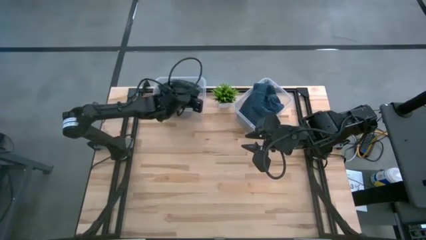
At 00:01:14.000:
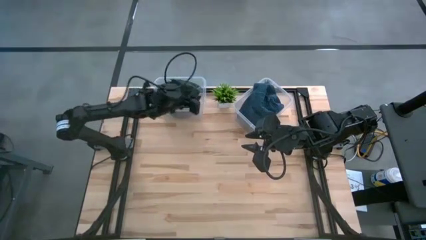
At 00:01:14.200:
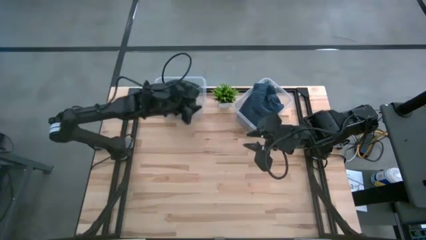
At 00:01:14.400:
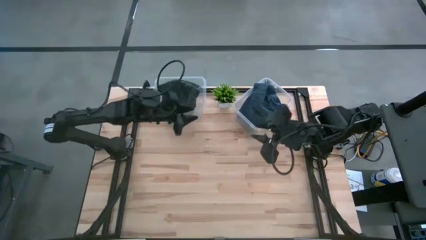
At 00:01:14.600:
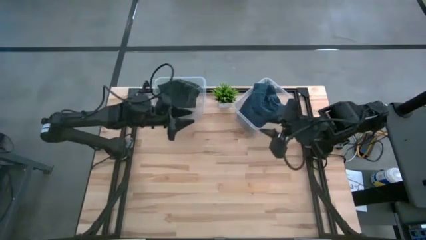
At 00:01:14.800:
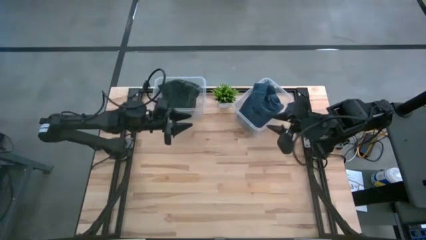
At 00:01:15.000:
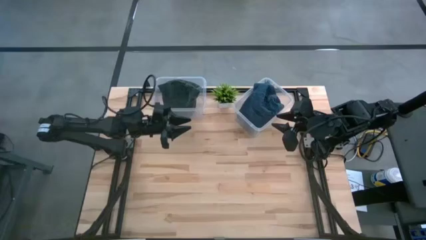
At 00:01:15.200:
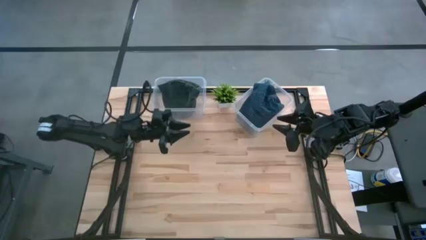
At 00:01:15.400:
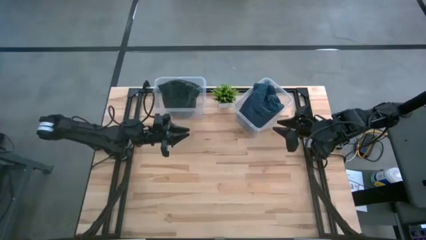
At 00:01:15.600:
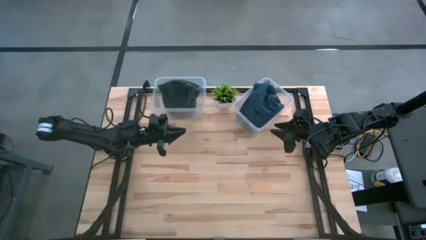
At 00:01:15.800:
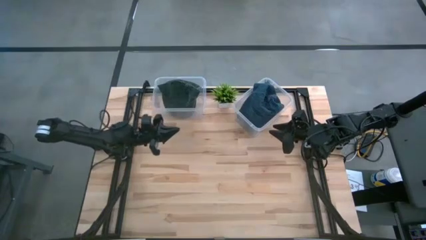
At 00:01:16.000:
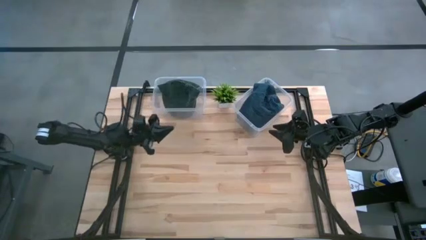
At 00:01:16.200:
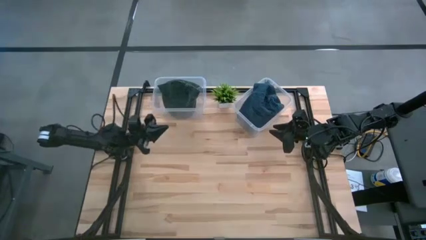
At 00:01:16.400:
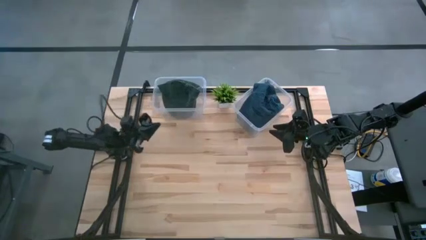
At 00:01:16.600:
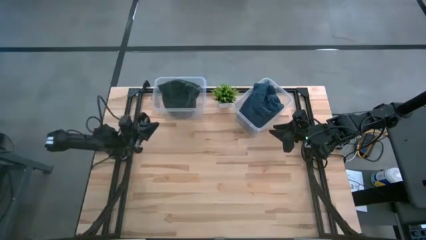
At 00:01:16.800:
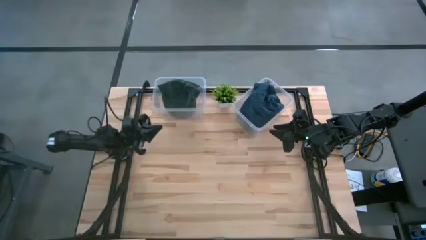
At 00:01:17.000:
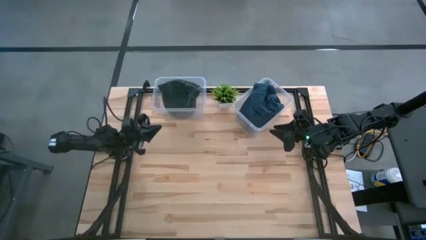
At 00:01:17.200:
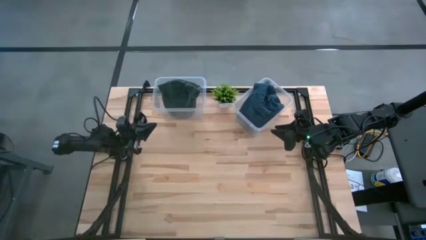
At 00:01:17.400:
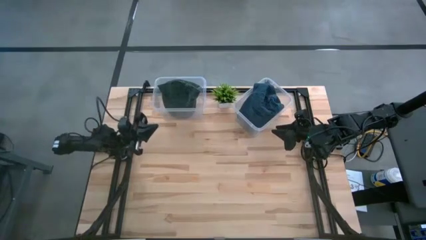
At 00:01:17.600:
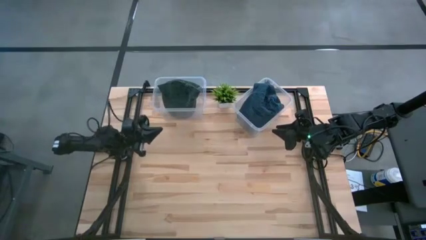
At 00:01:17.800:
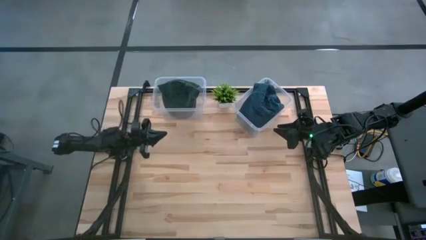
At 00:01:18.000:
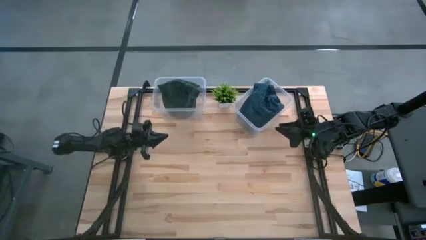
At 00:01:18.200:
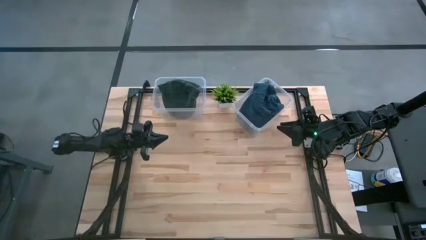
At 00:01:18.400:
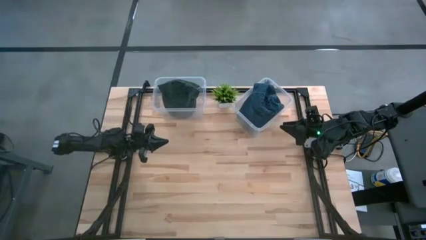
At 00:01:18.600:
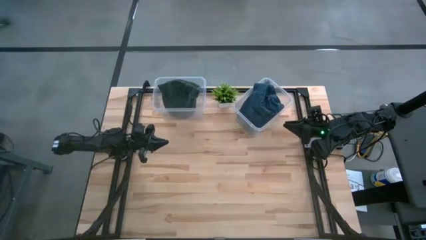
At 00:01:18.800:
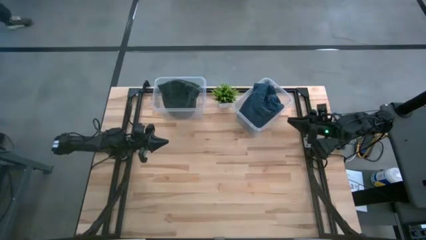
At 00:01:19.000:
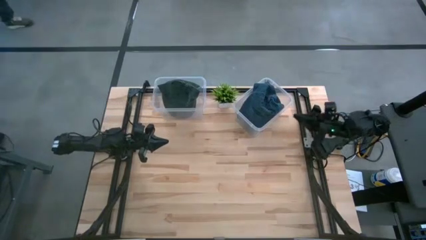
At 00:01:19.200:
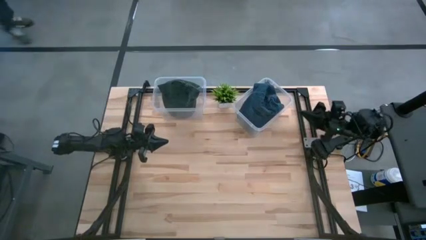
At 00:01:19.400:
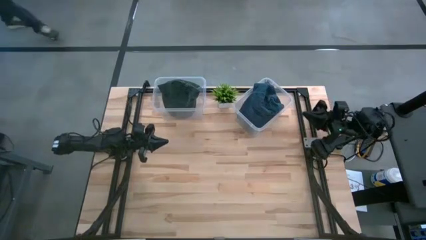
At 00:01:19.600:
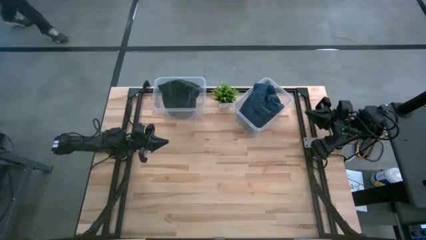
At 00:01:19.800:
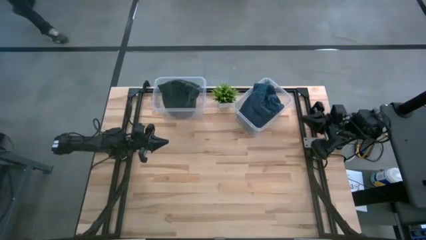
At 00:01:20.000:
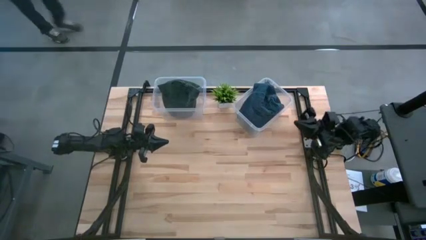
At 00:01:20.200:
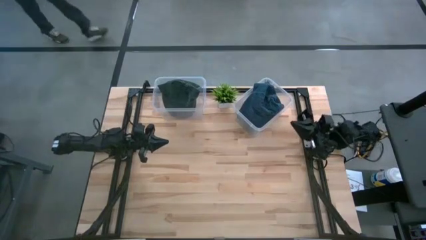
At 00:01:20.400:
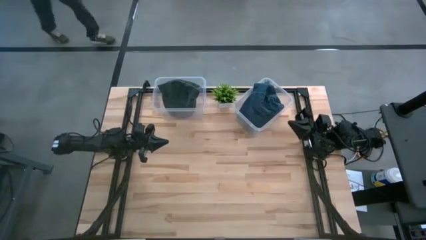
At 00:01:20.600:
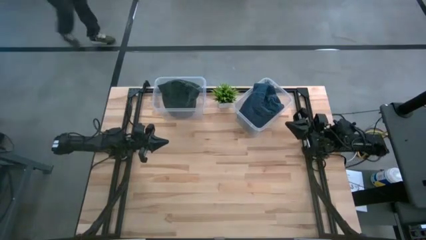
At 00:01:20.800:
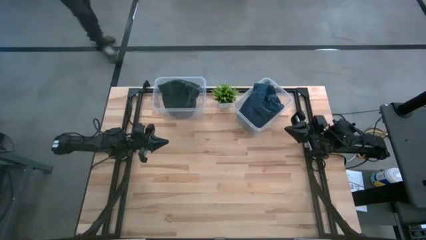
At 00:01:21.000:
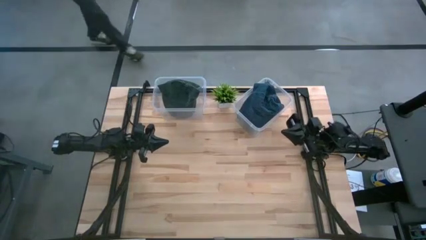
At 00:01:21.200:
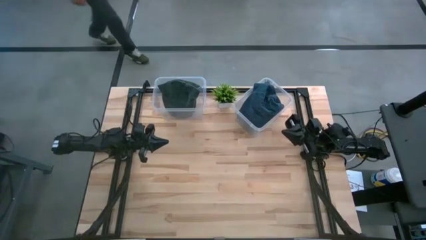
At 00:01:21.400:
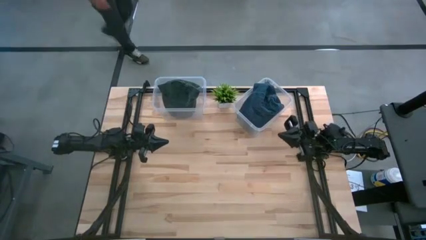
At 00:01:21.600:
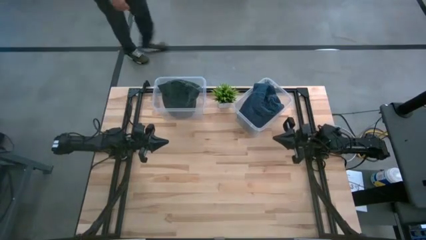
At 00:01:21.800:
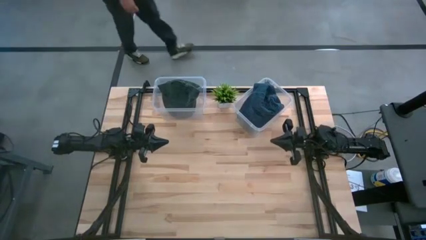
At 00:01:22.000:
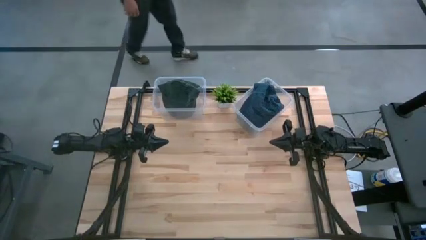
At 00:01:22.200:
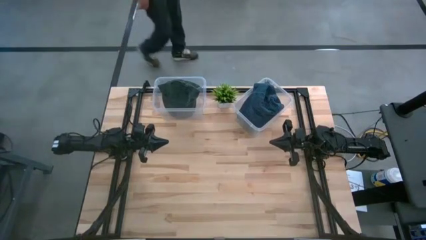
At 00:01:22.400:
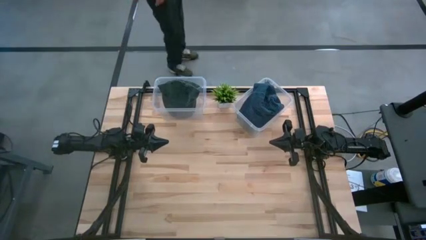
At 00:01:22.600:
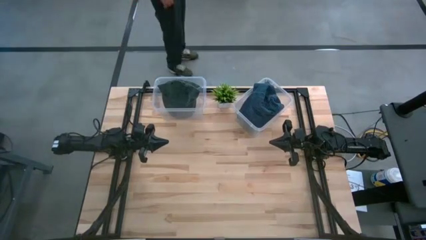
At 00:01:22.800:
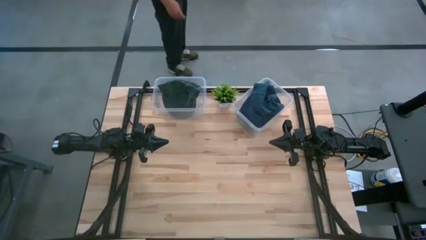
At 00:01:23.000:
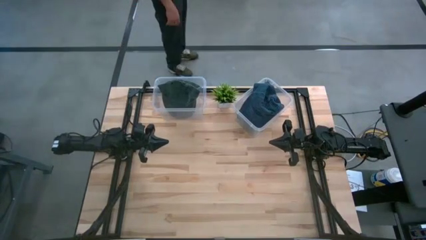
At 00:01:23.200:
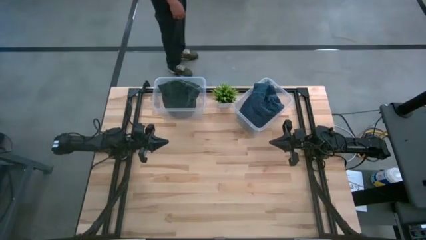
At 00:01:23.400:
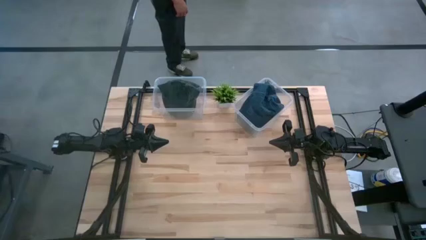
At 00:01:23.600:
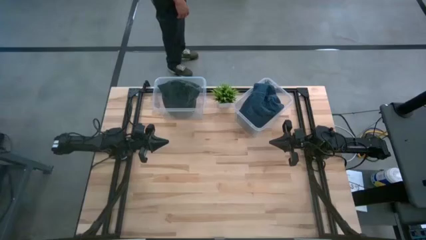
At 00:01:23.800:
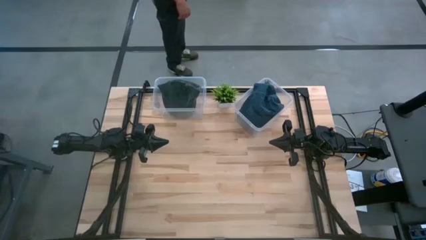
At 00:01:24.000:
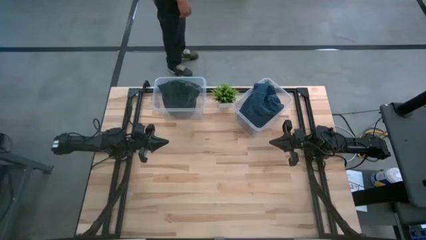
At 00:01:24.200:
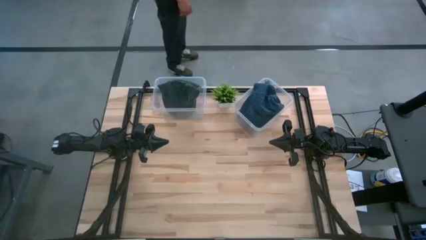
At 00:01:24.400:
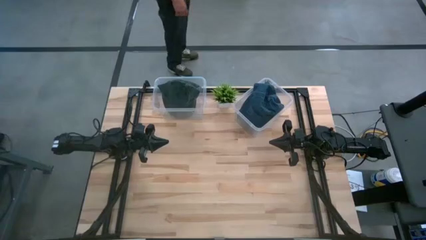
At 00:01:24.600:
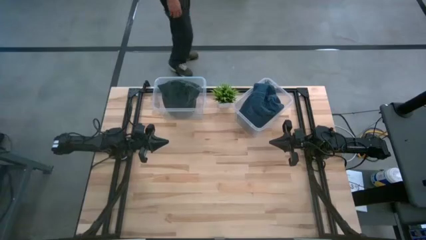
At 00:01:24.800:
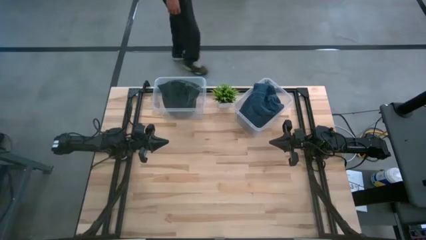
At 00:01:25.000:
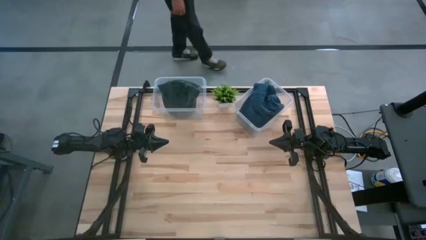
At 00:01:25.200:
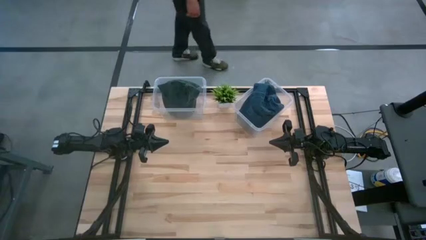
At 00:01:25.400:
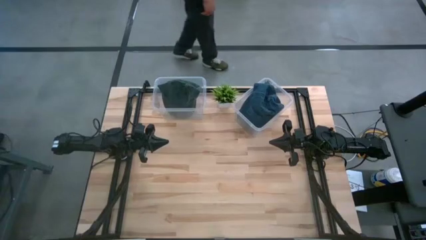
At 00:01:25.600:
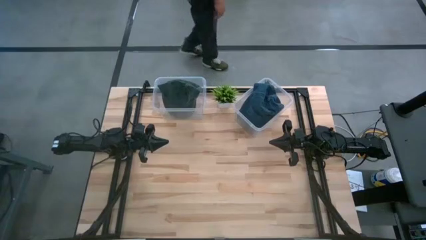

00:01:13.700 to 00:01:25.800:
Task: Pick and place caps into container
Return to Home Position
